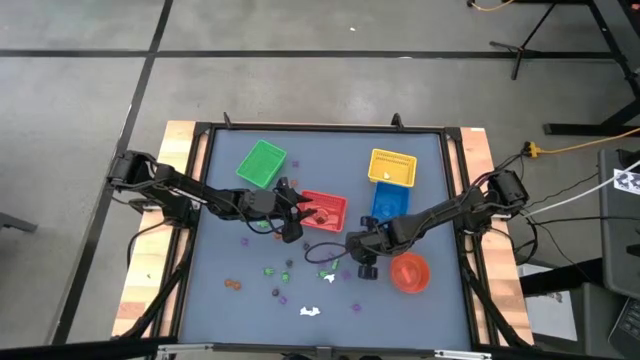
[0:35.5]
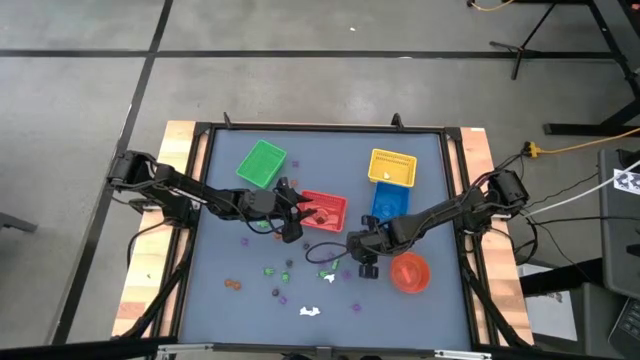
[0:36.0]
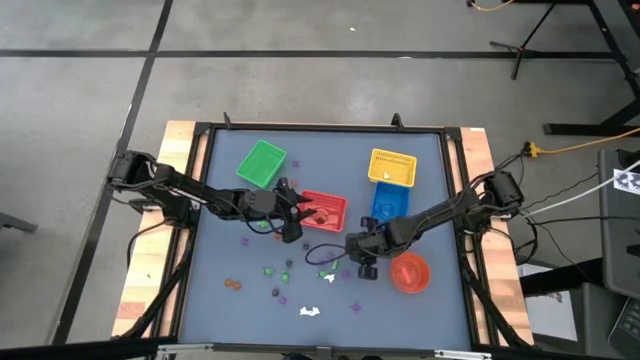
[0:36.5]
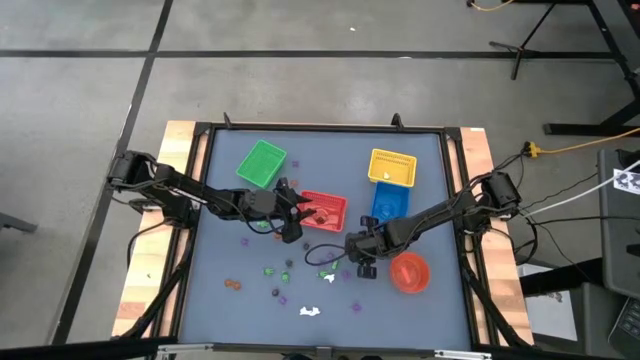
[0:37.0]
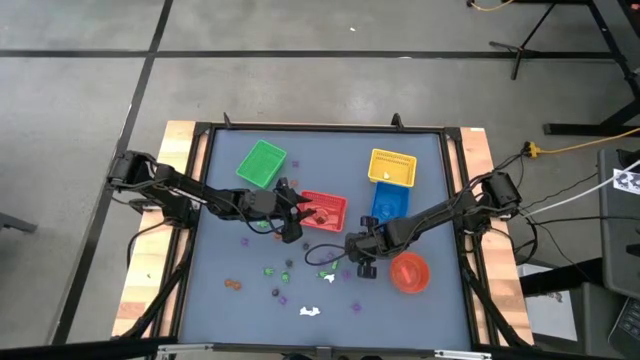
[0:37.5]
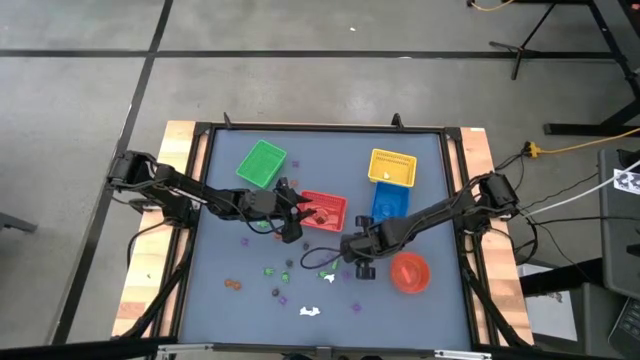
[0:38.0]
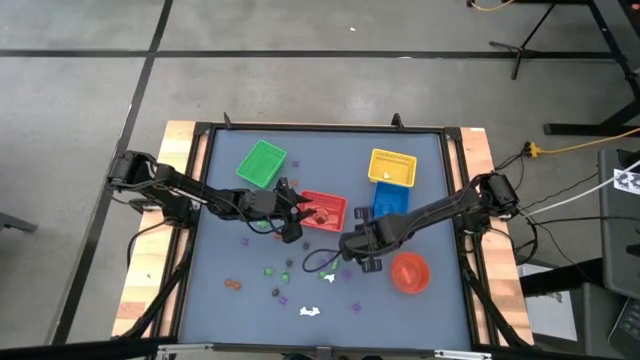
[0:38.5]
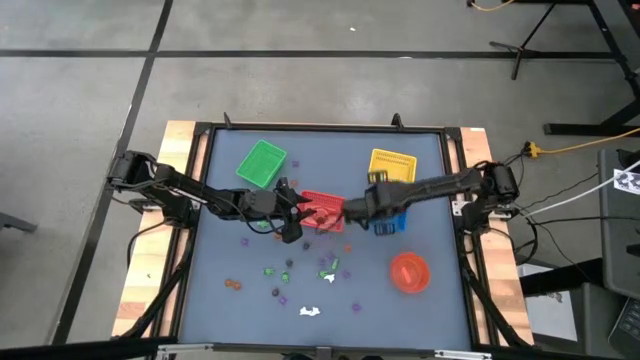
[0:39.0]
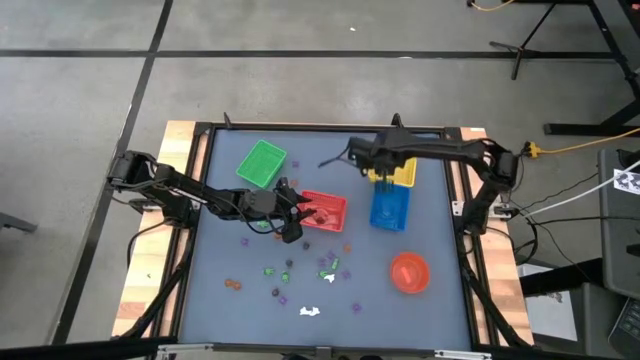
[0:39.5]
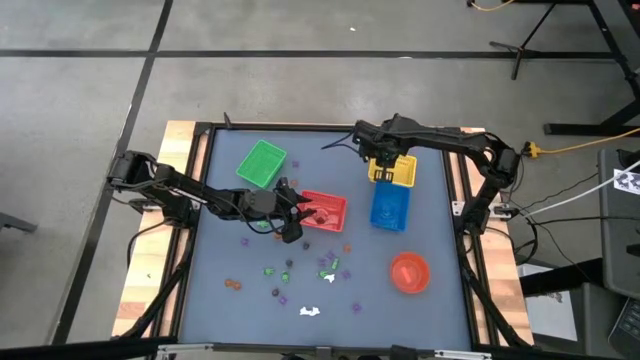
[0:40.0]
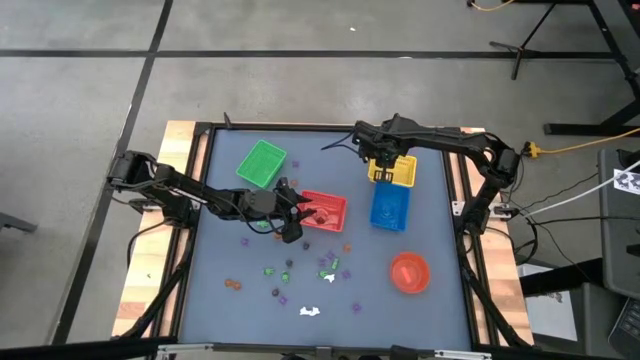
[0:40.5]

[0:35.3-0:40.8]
Task: Sort Halloween decoration
Put the white ghost toy into the yellow bin

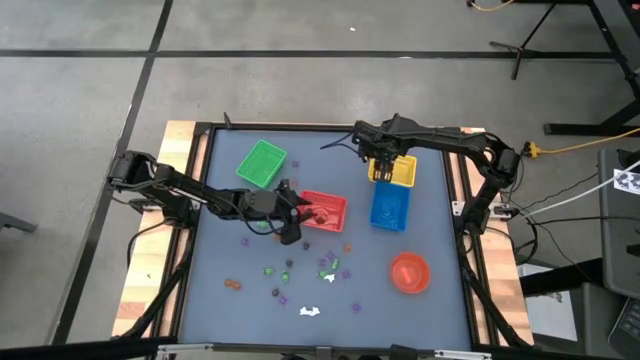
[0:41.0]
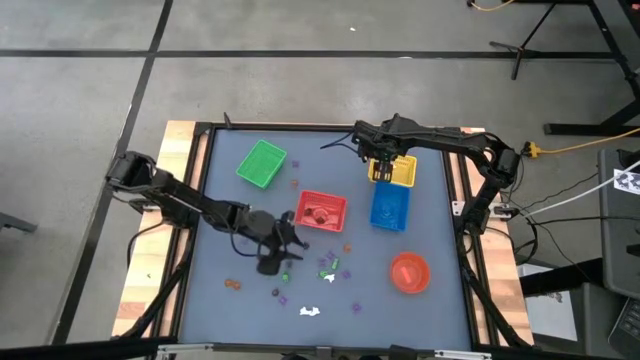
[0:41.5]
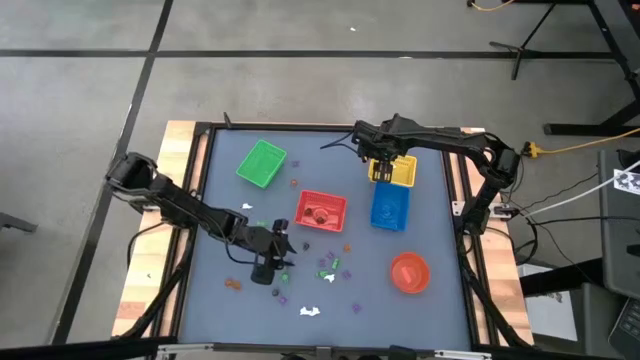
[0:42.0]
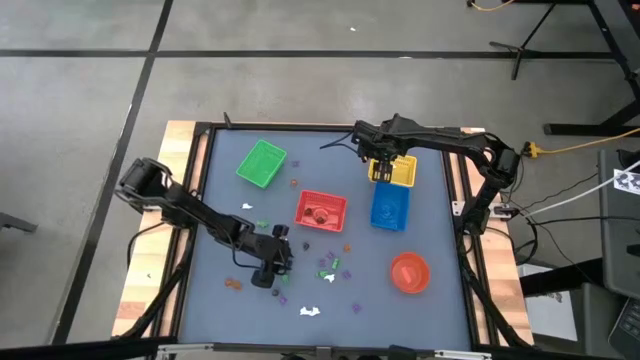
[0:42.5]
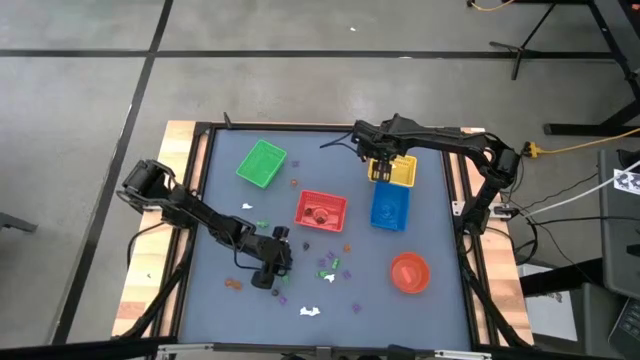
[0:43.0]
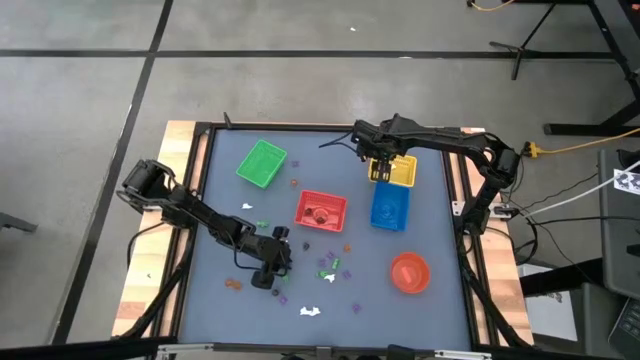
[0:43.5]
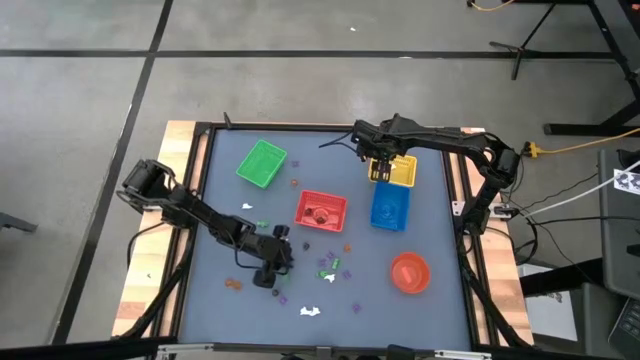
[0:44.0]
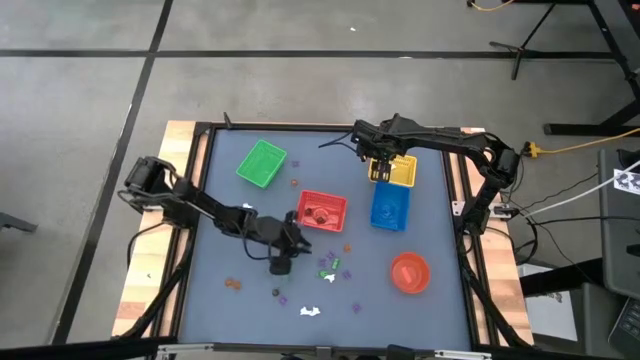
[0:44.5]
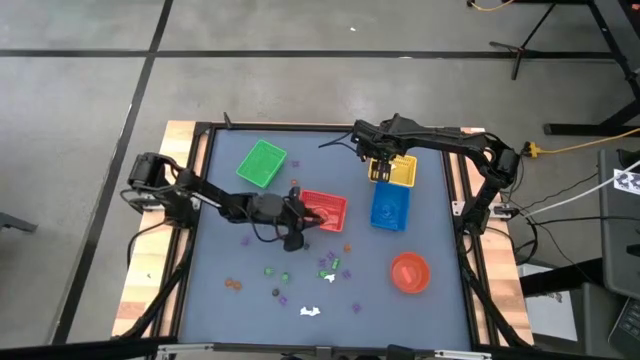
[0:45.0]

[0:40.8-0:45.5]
Put the black skull toy into the red bin

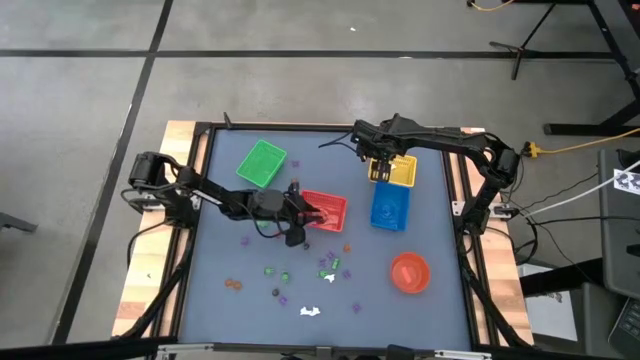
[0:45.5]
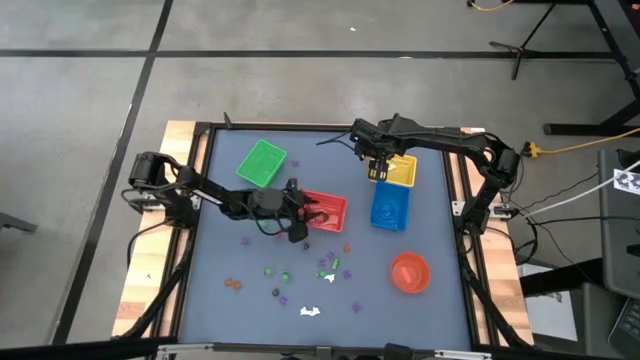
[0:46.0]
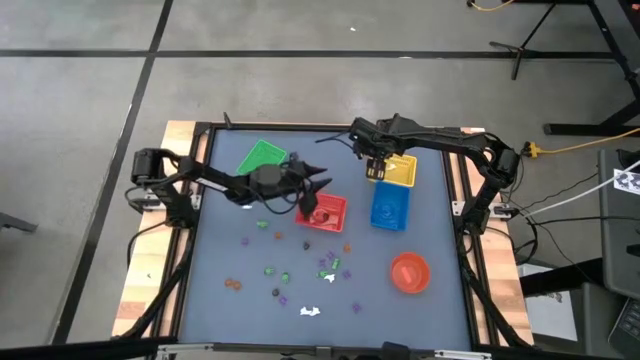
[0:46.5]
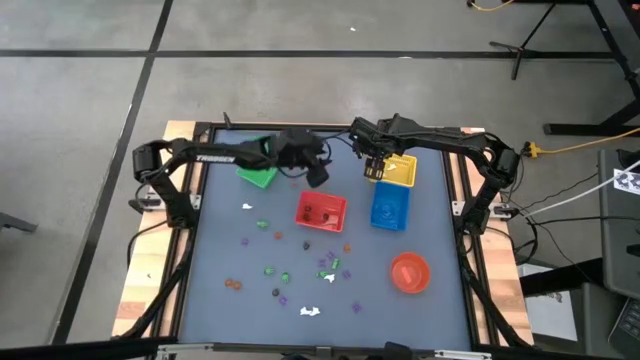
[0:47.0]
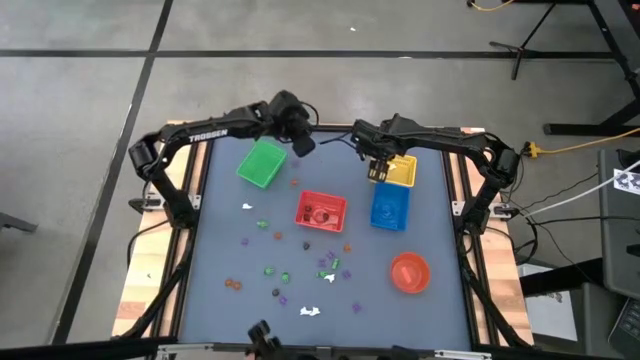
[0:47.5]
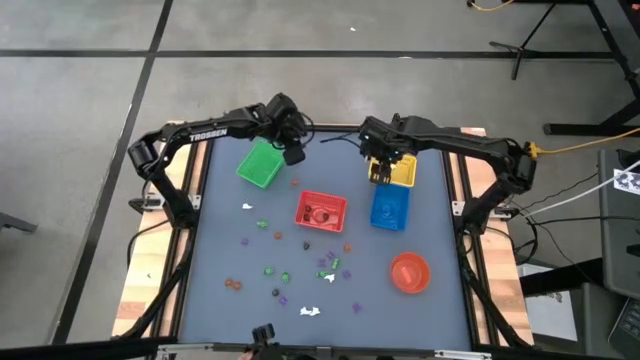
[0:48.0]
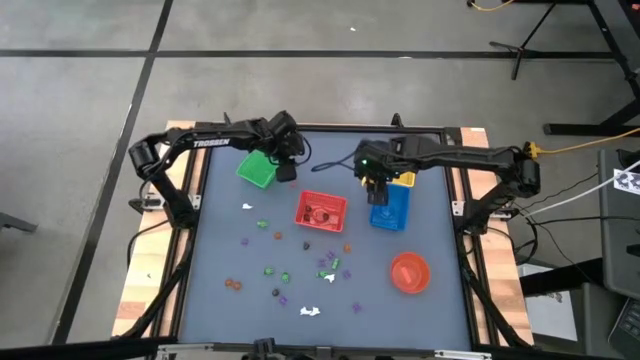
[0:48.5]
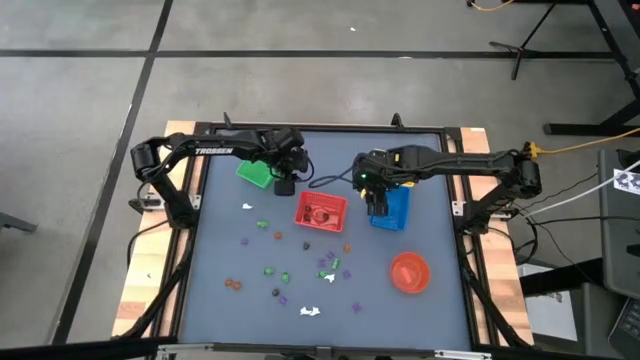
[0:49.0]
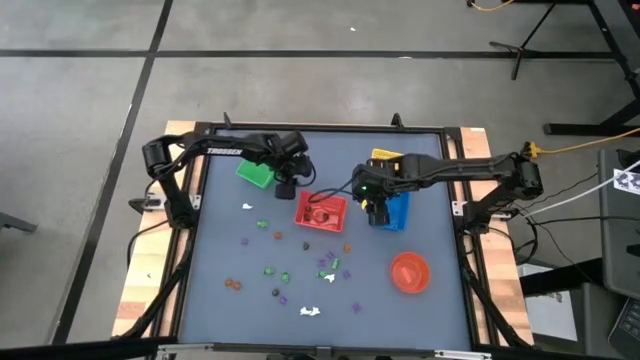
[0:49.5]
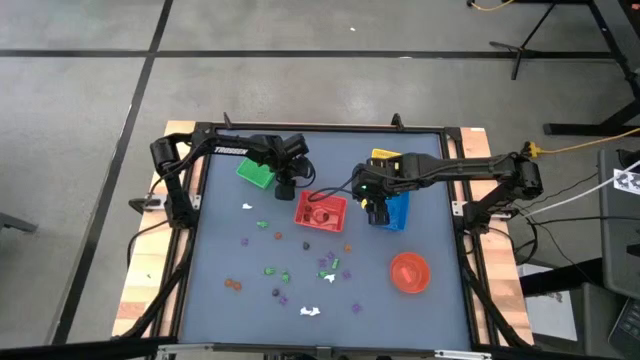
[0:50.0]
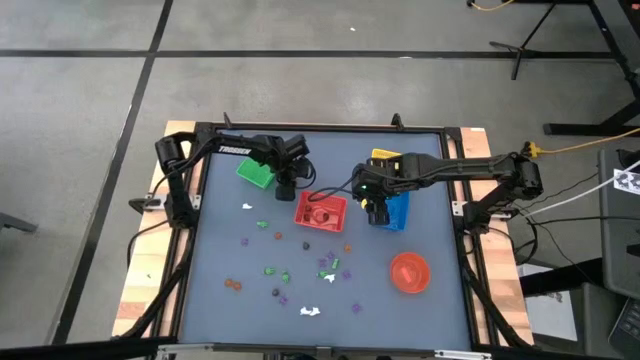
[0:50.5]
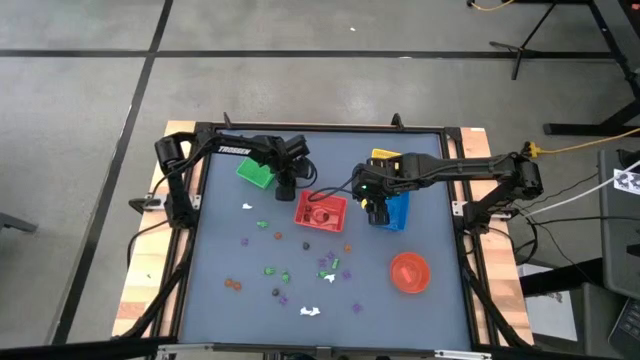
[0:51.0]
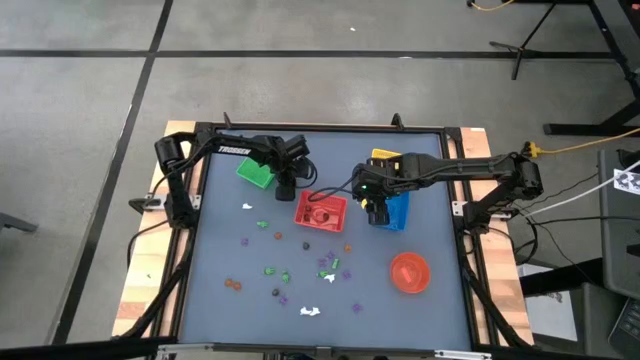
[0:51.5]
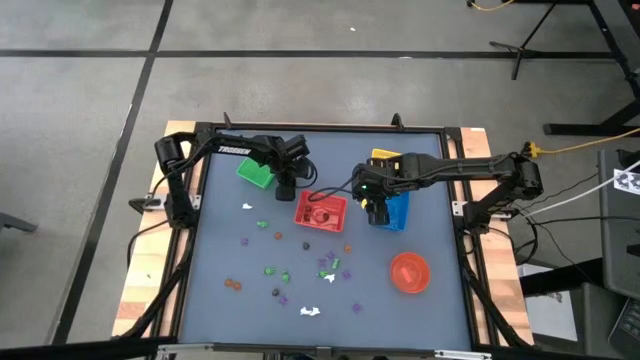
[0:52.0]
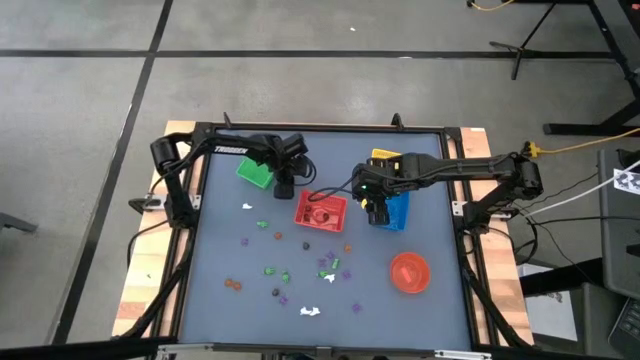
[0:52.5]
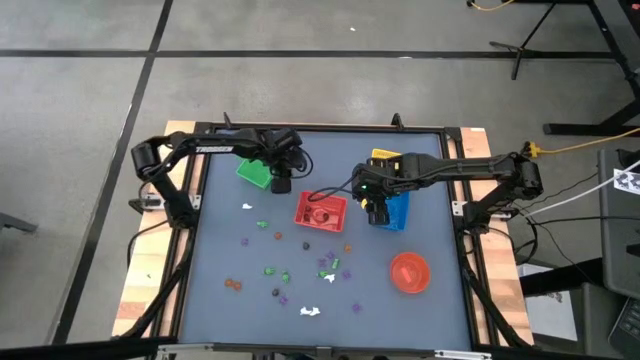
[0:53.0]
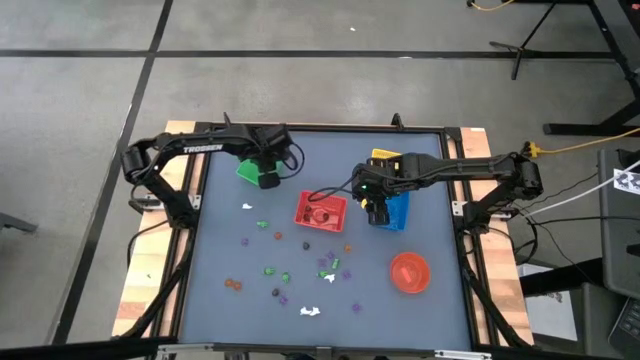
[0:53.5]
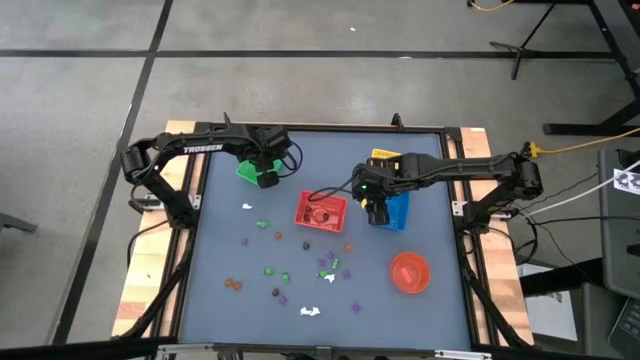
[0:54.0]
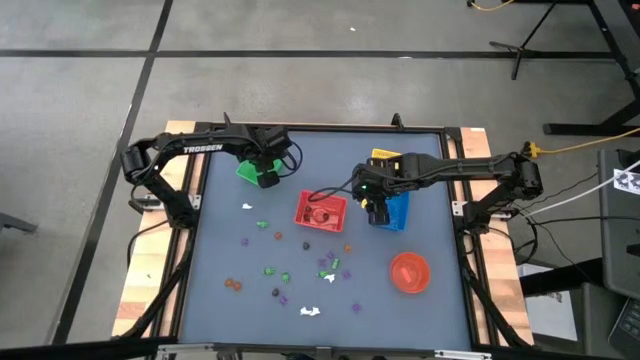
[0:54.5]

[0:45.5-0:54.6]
Put the orange pumpkin toy into the green bin
